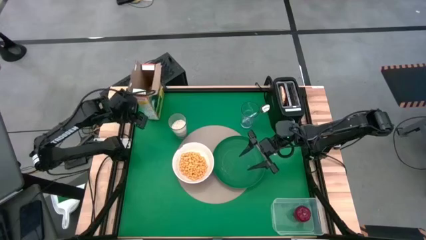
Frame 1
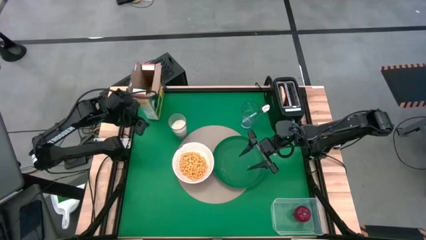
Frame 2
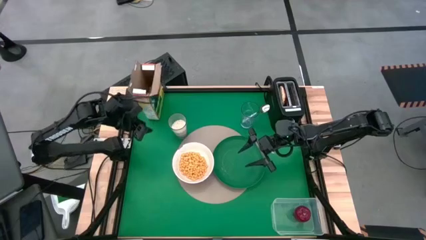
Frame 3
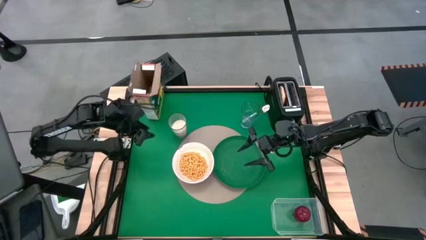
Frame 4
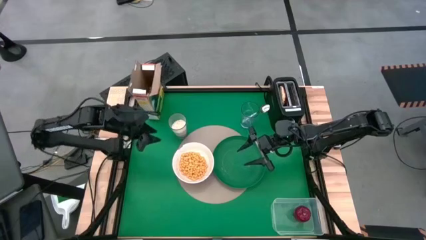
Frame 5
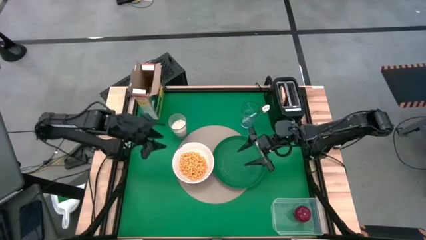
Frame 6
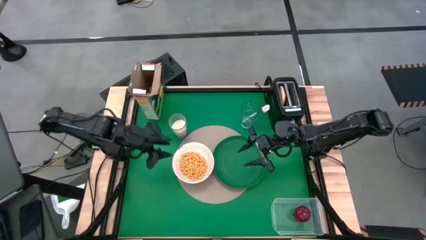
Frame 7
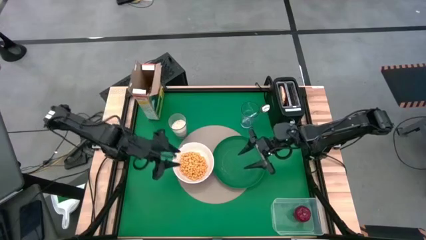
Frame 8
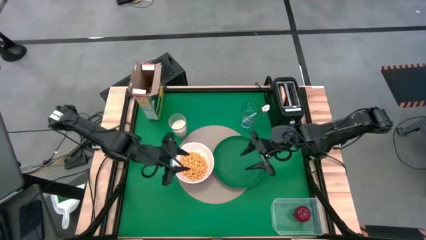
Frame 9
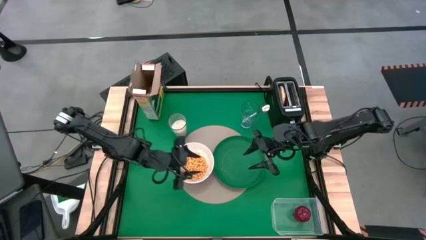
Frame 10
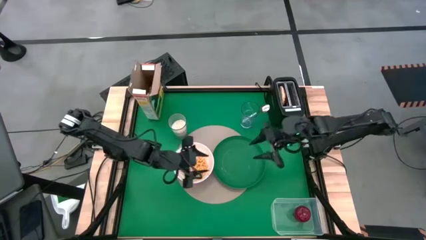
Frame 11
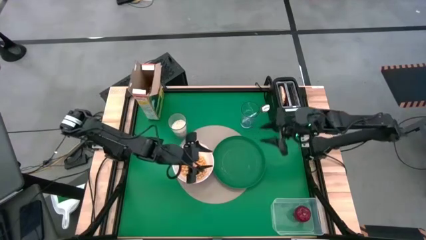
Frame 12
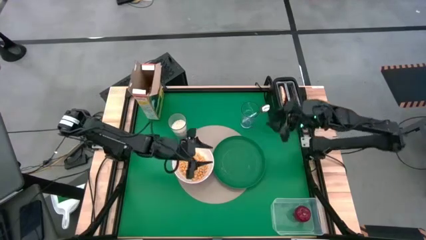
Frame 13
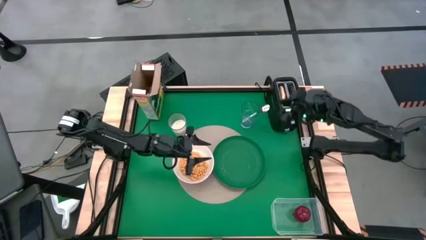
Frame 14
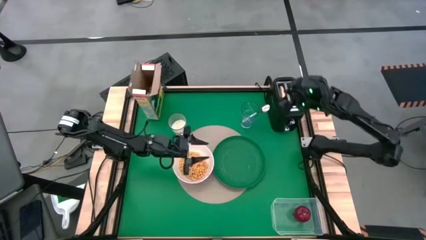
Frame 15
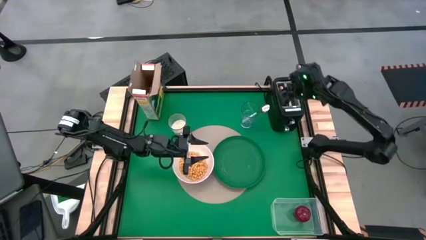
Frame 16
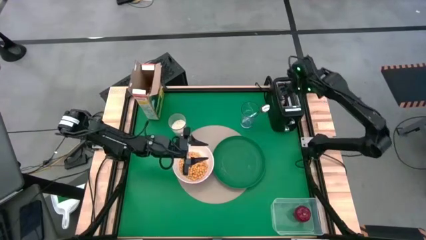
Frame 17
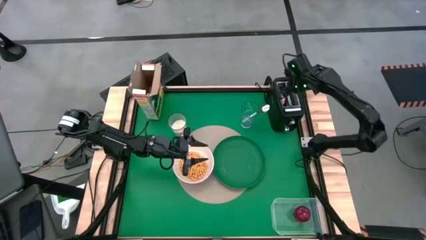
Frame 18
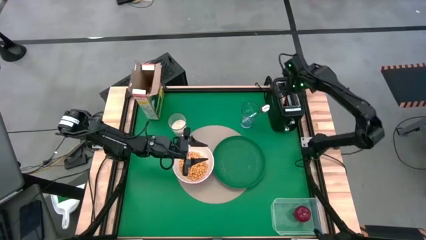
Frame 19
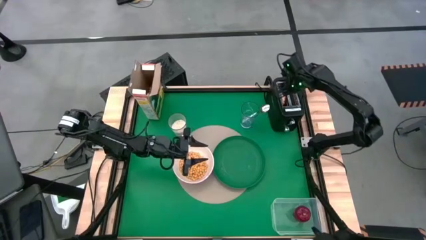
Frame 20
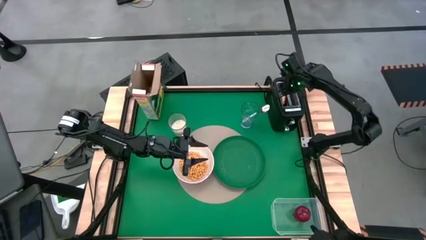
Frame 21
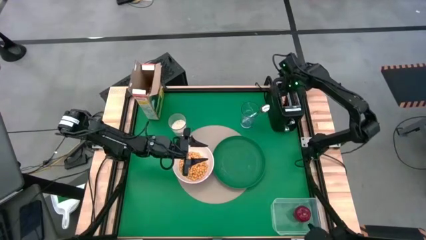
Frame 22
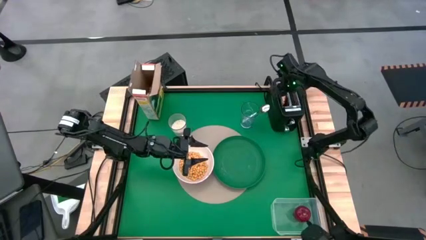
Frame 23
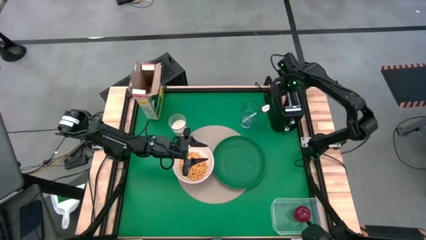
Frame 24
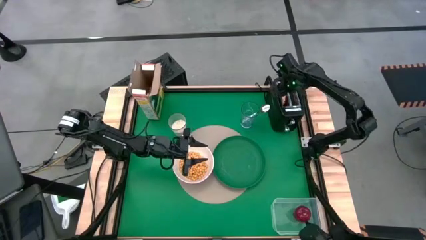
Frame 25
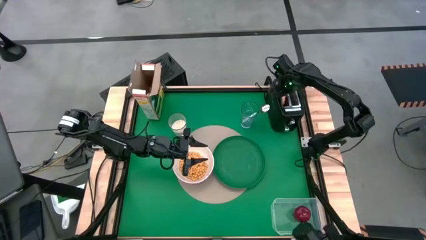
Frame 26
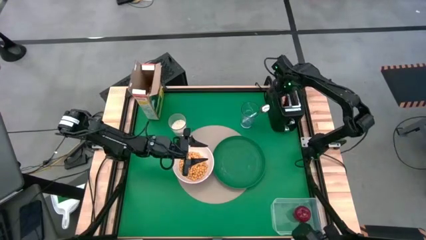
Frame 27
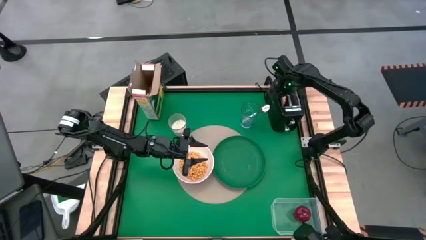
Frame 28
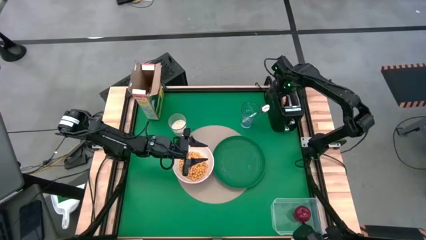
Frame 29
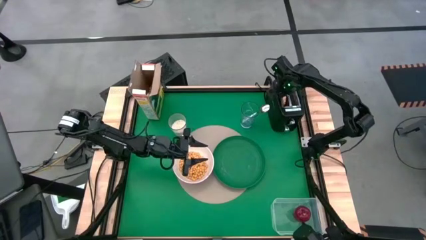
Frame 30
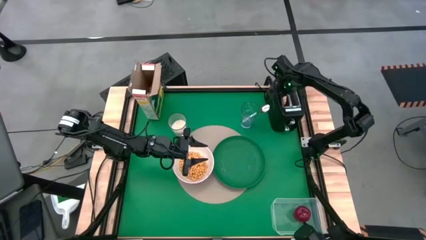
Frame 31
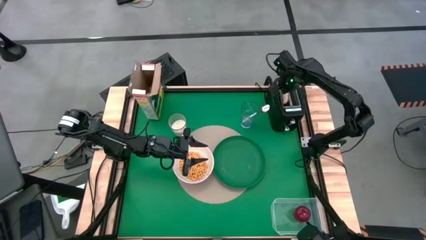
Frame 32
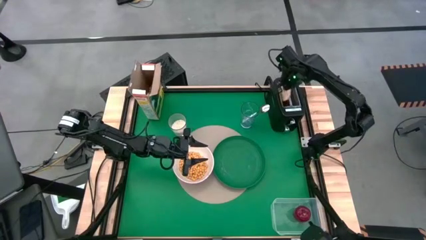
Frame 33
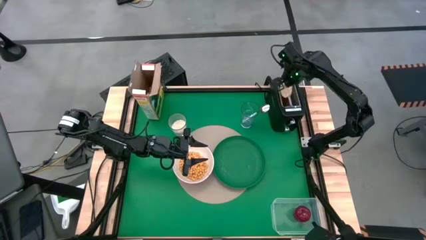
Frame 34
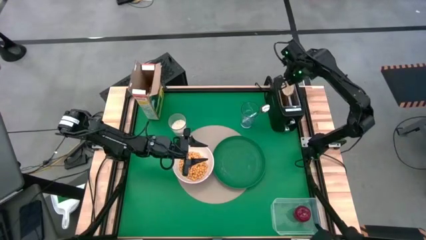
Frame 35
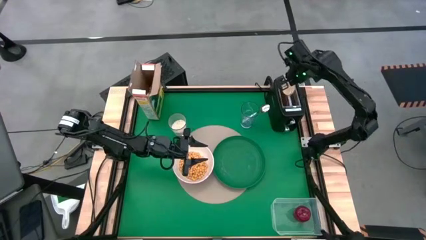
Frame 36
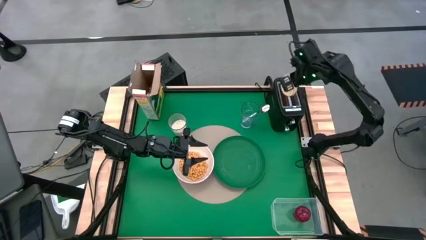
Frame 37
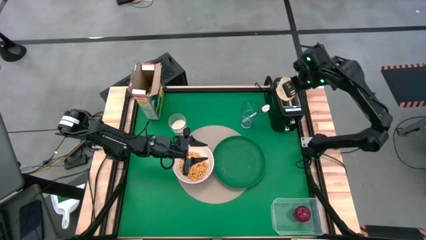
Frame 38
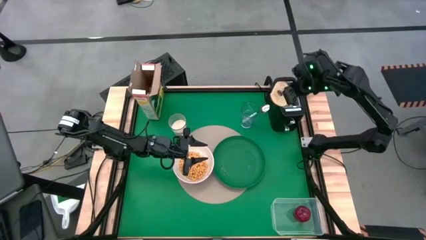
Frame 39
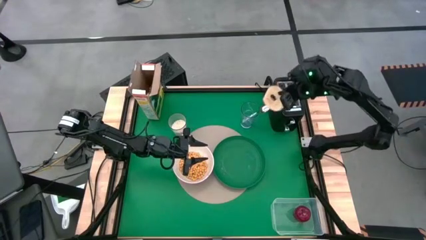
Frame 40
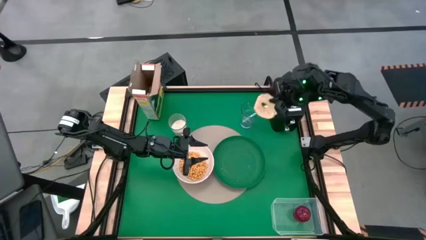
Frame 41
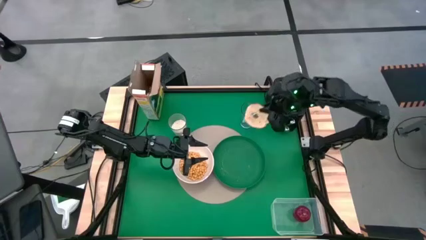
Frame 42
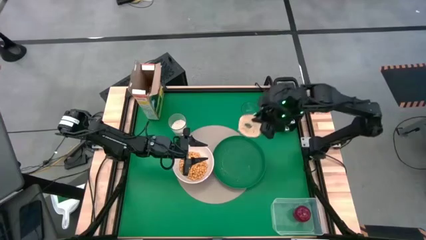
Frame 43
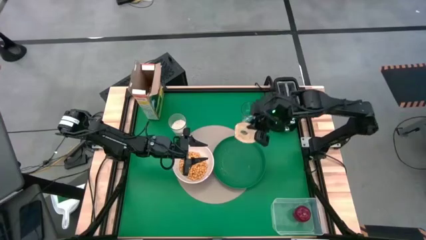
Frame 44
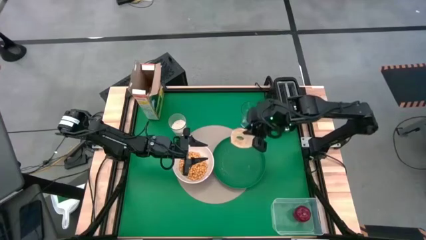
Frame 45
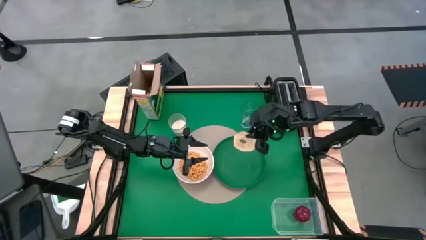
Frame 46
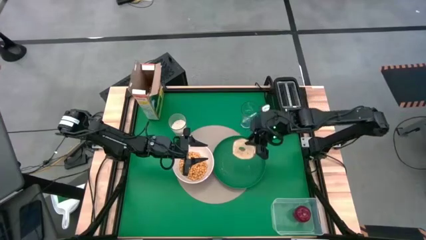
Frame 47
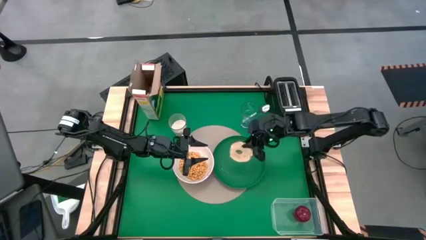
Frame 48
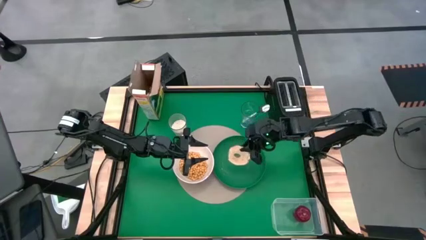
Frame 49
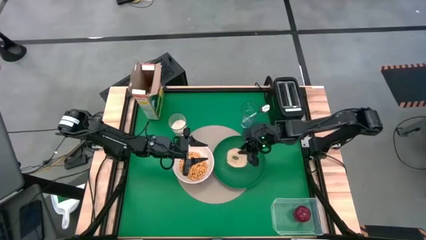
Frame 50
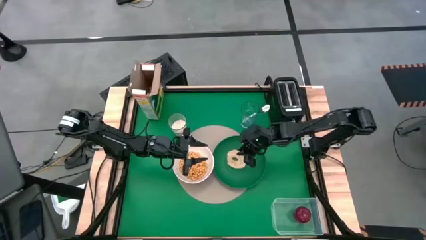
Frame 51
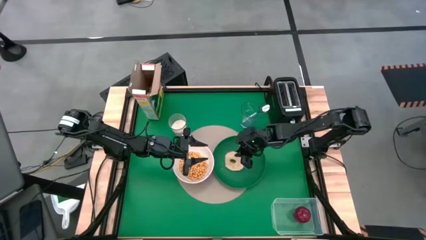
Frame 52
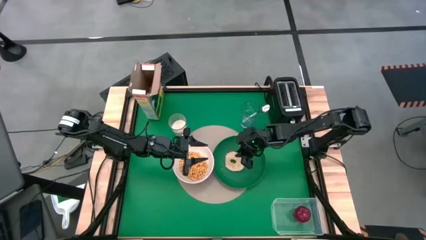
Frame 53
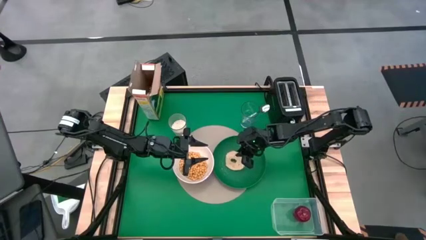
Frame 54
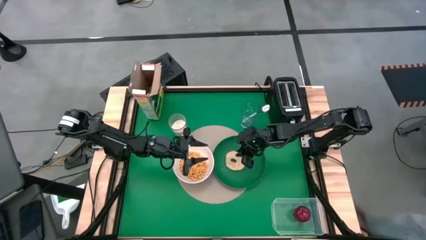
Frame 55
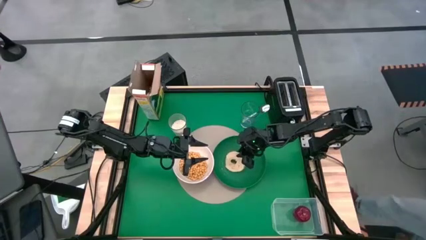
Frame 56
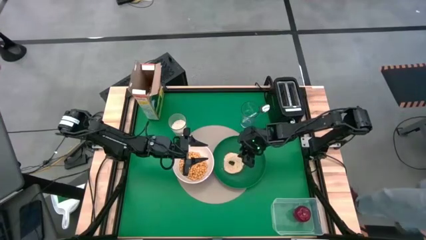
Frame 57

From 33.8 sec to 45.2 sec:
Task: Arrange a breakfast setting
Put the toasted bread on the green plate

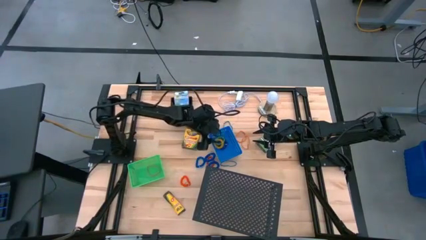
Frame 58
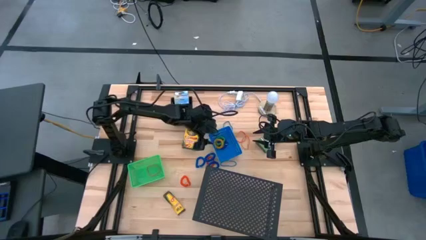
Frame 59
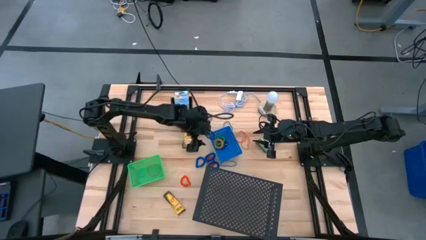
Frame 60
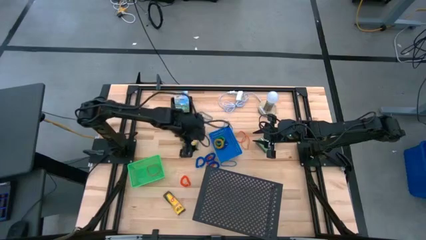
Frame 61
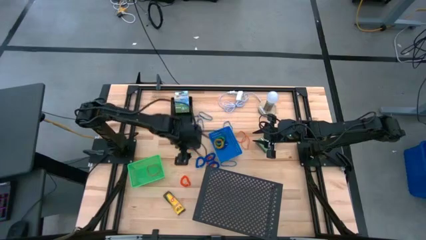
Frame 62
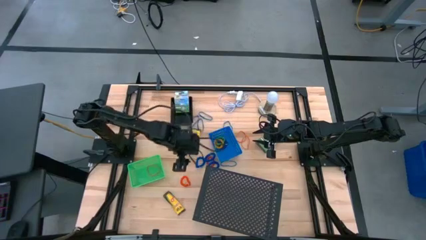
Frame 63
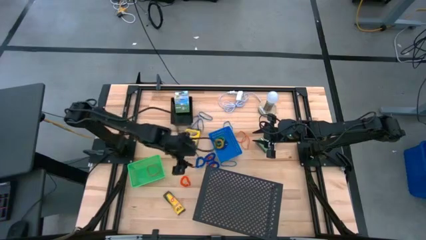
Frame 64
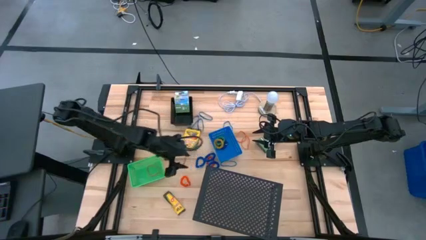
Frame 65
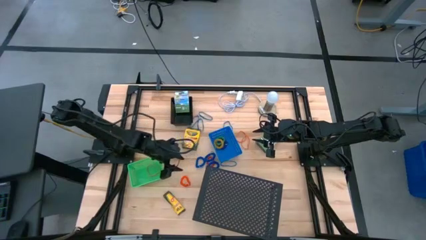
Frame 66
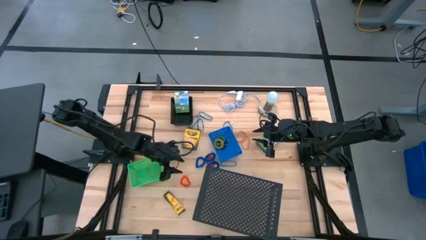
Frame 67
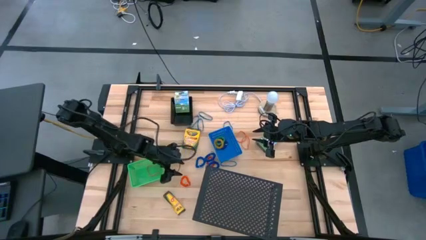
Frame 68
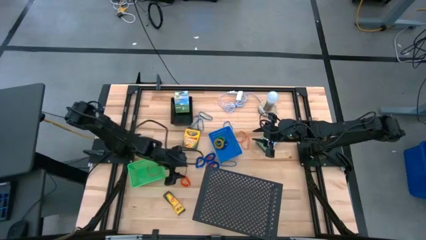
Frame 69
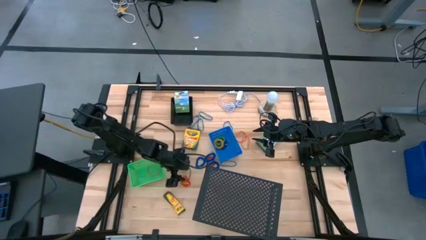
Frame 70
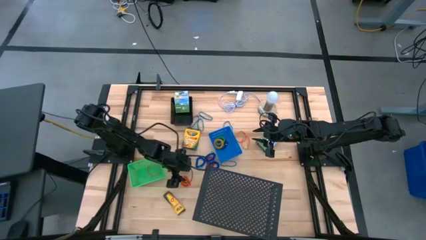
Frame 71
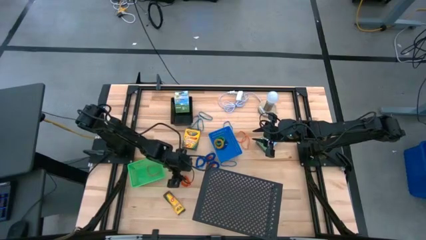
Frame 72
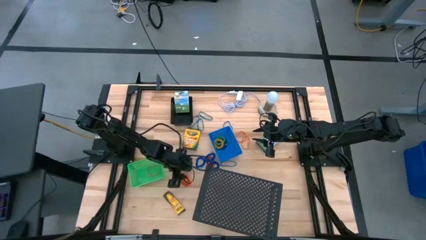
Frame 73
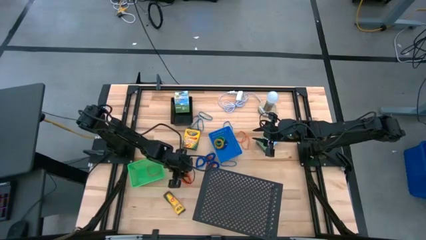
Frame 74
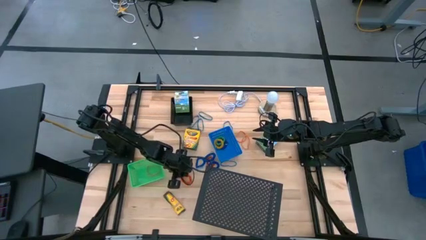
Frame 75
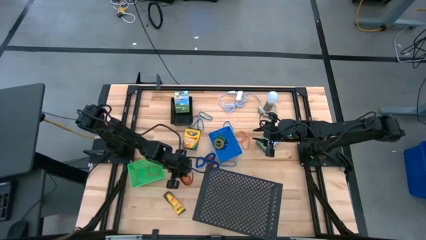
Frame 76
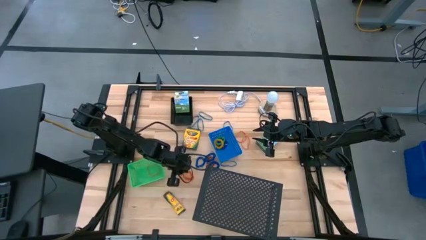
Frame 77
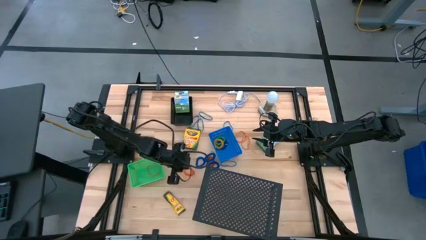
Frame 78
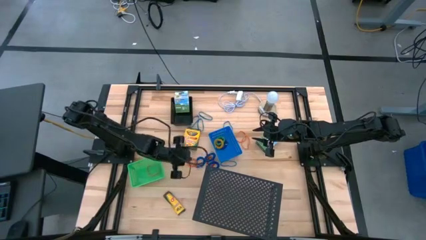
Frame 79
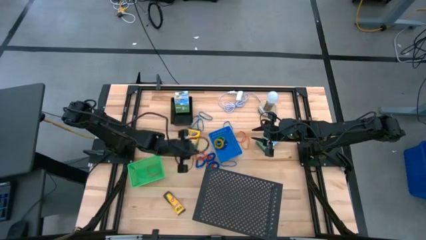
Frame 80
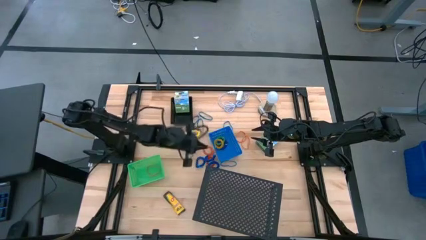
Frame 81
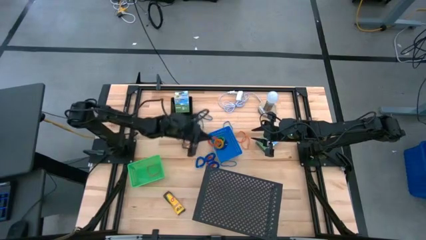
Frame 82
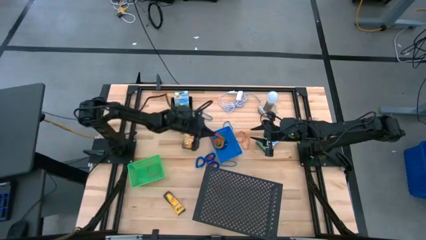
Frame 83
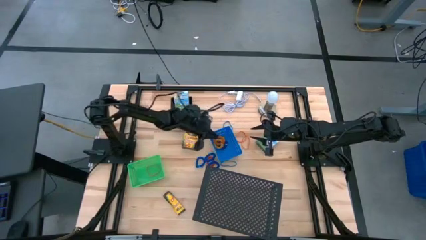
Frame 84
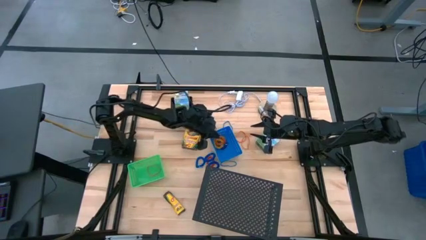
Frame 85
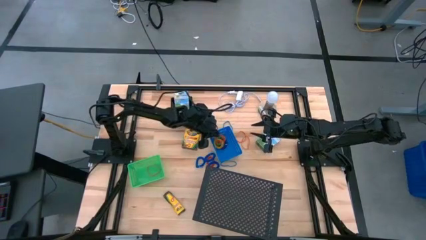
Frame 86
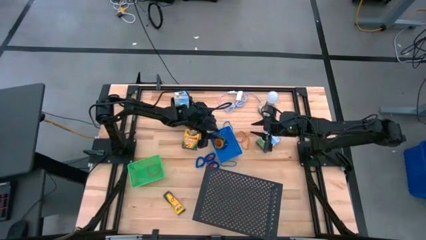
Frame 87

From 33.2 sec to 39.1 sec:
Task: Pick & Place Office Desk Supplies
Put the orange key band into the blue bin
